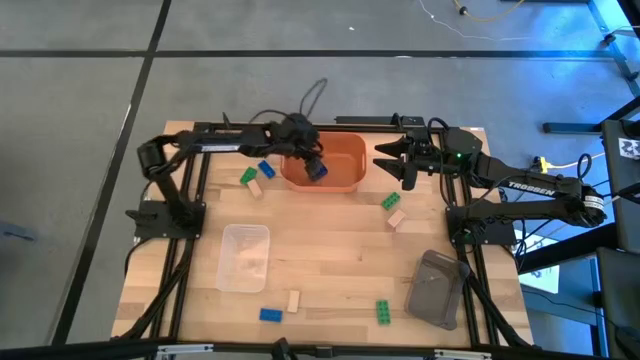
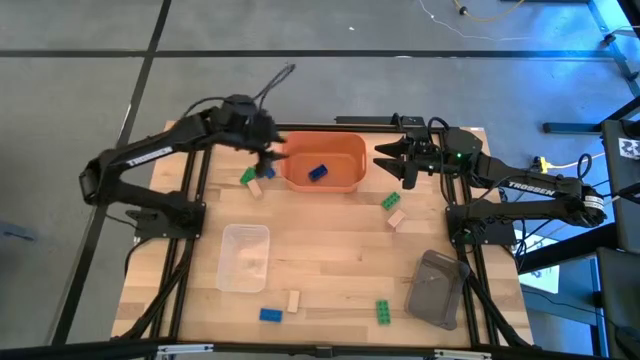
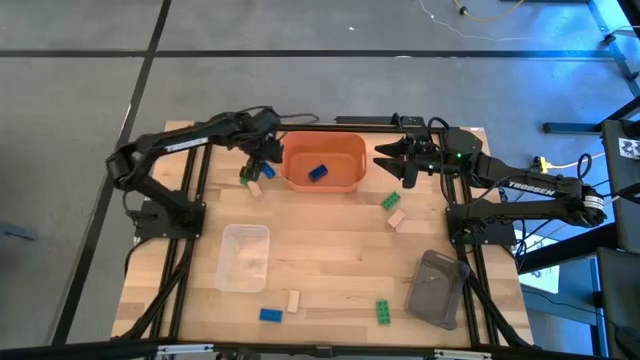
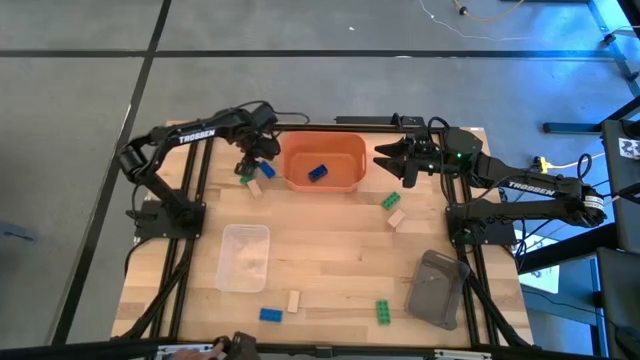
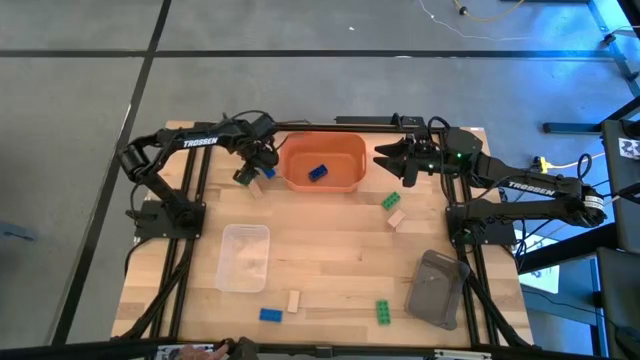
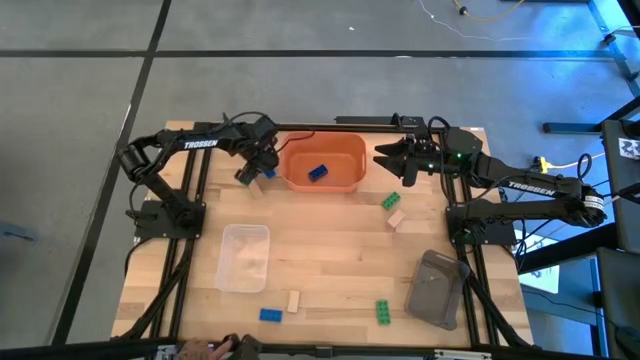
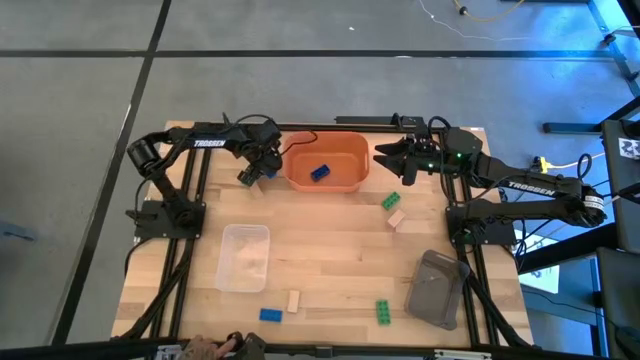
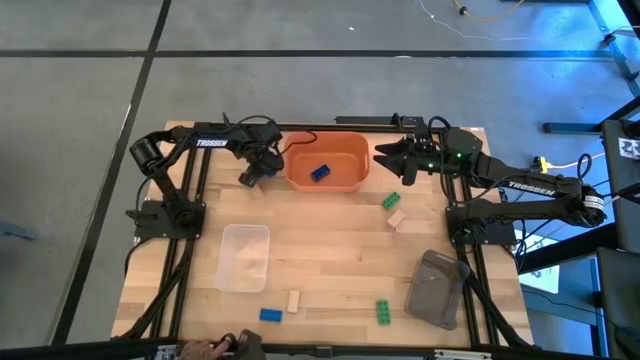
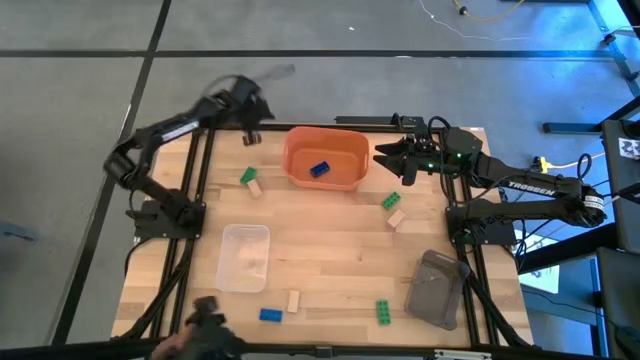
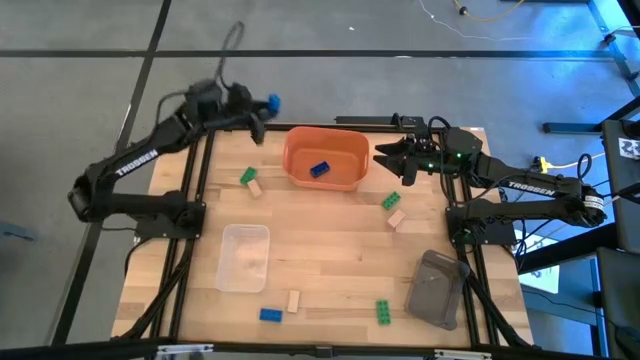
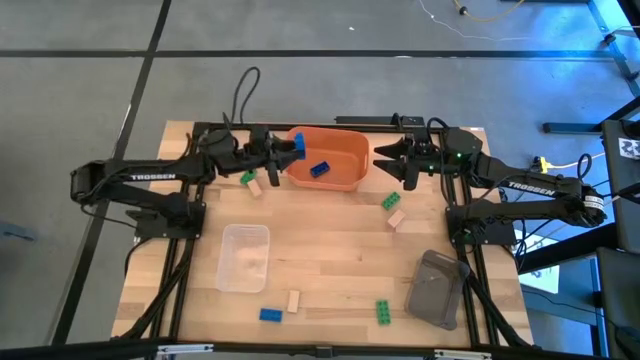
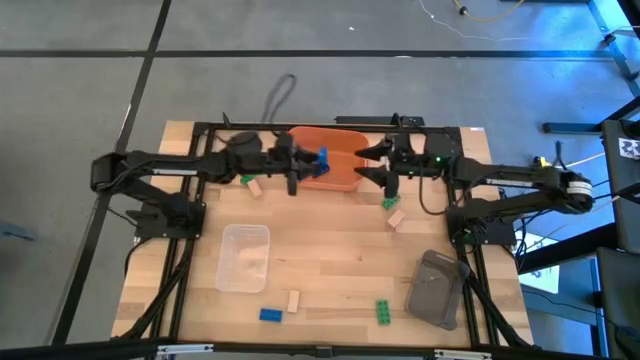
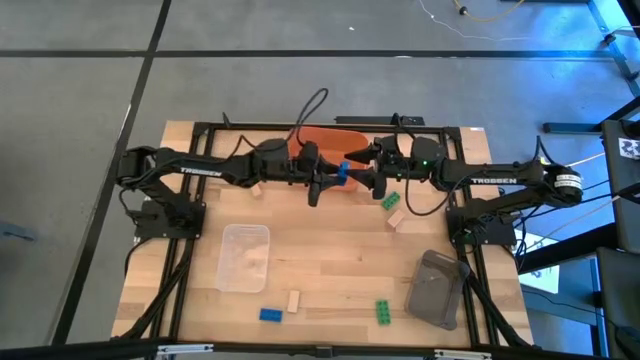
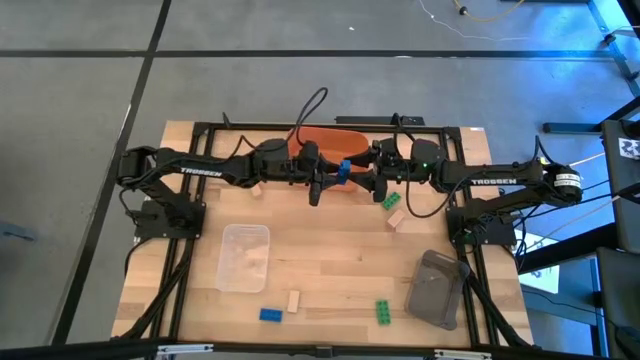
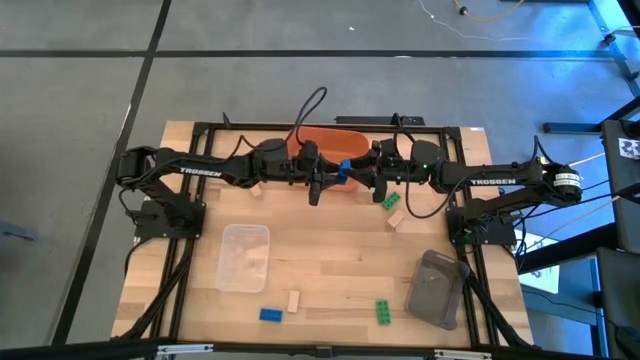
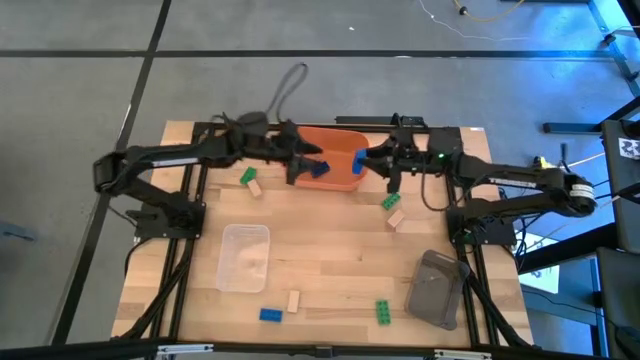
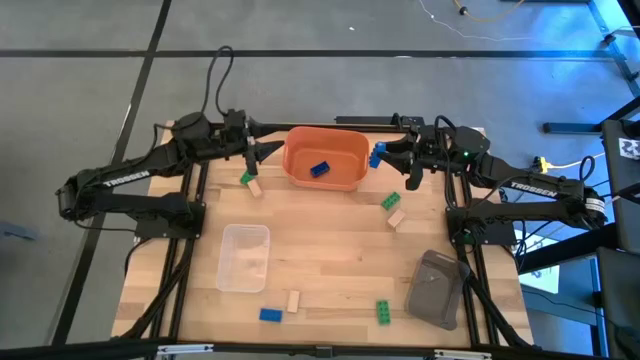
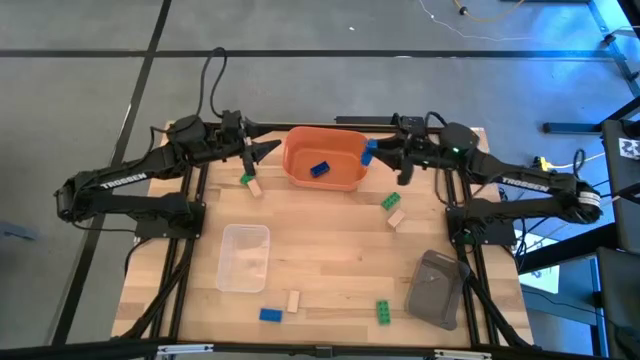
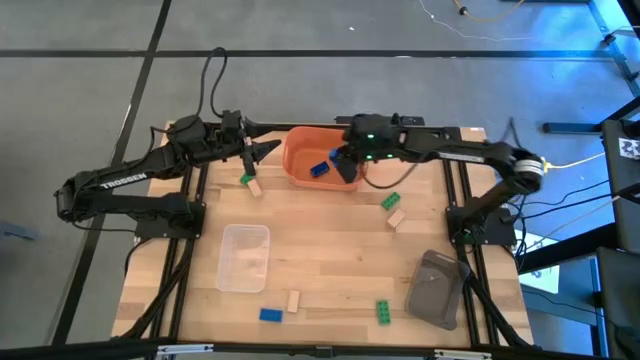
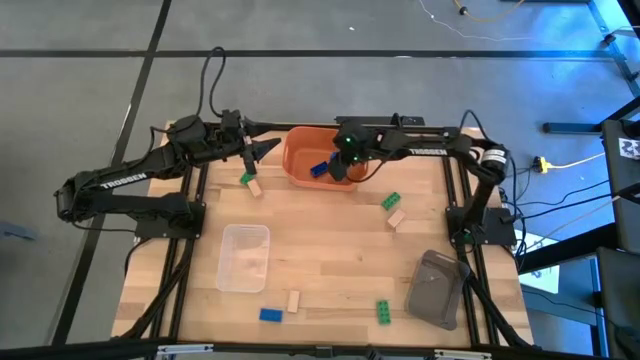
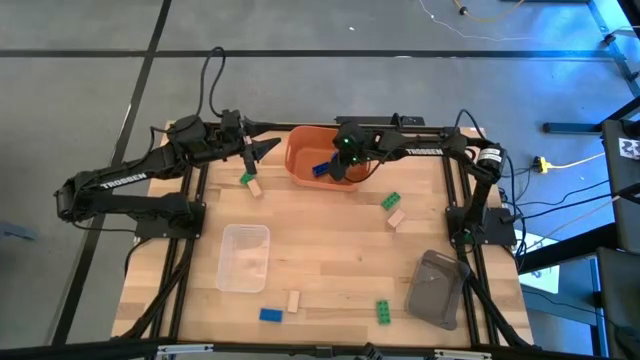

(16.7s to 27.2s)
Task: Sort & place blocks by color
Put the top blue game piece into the orange bin

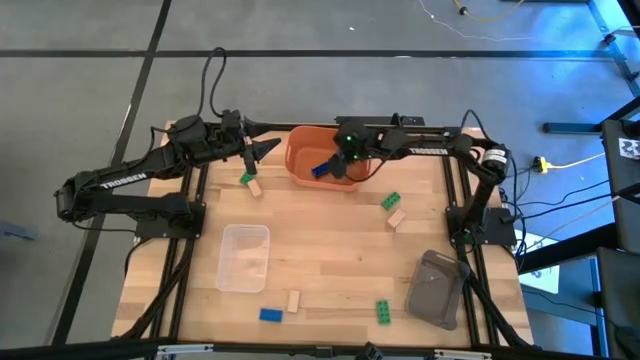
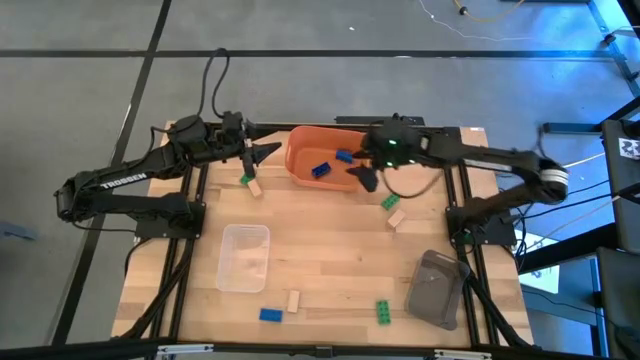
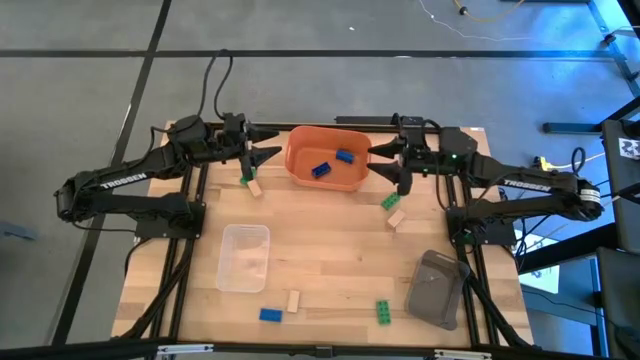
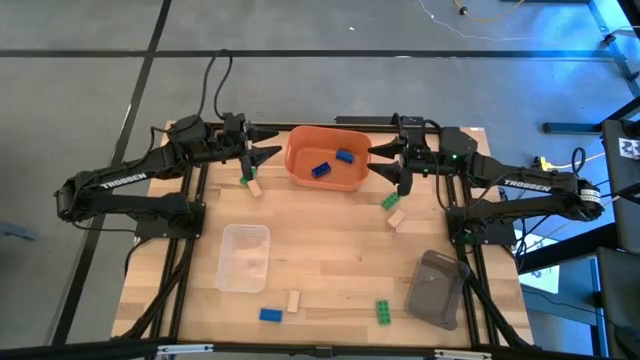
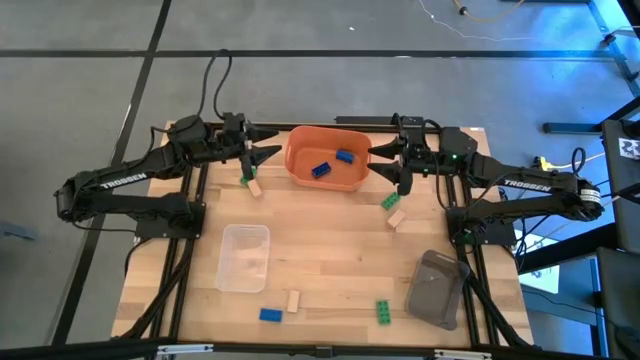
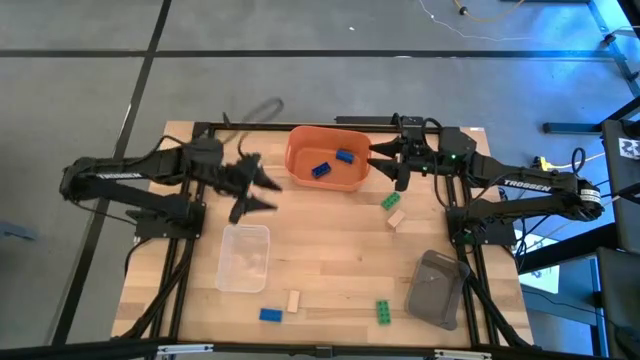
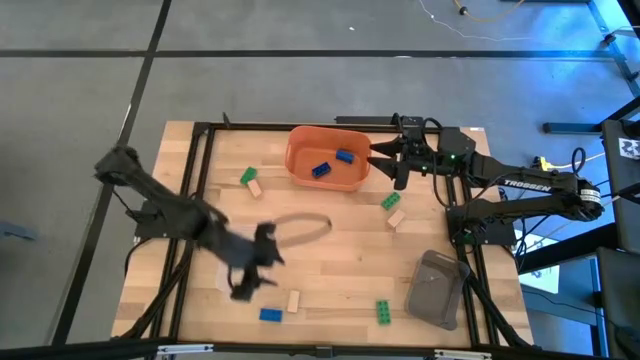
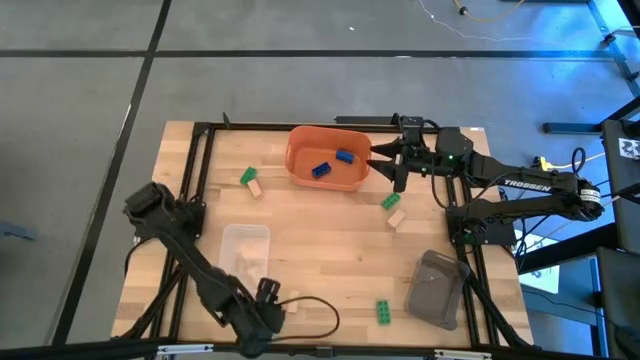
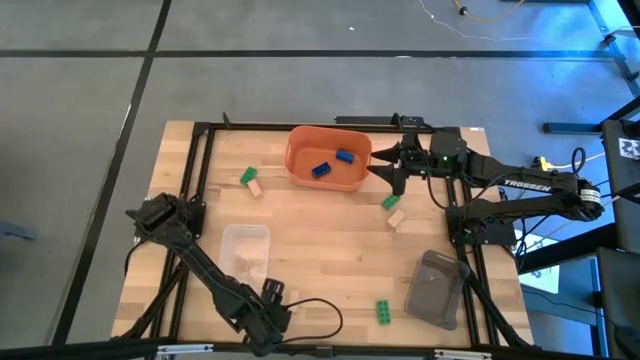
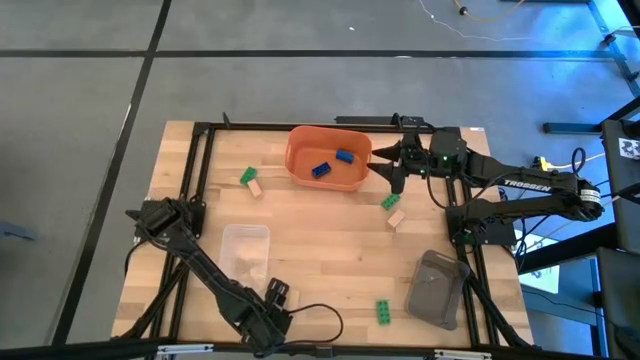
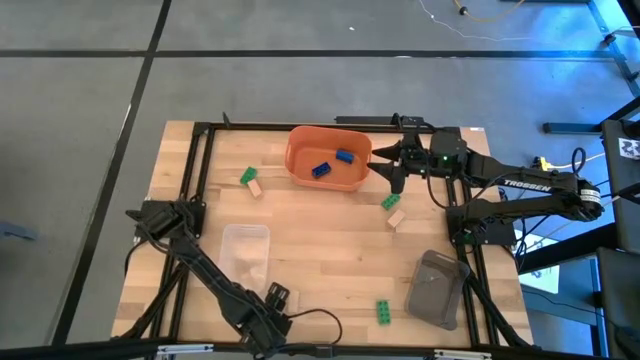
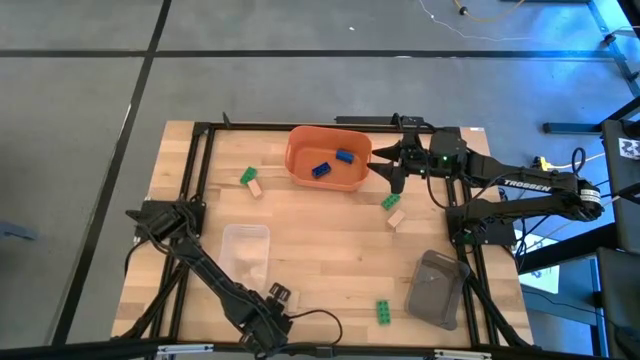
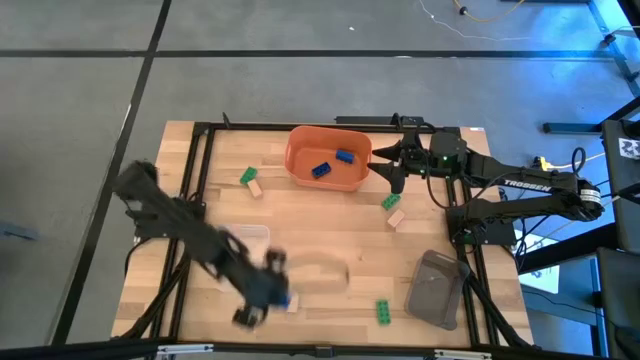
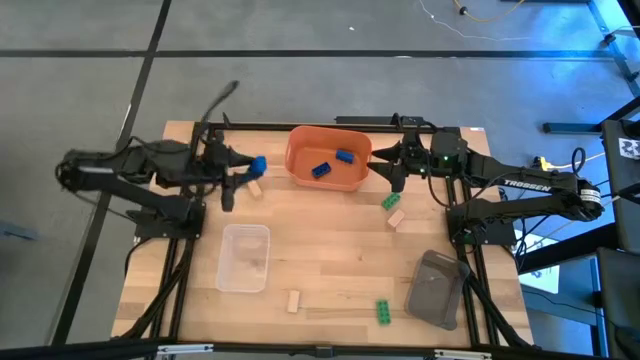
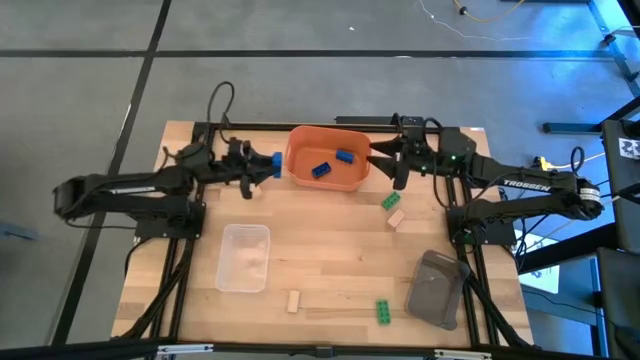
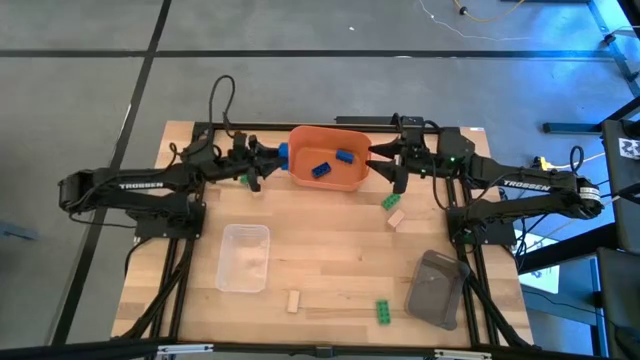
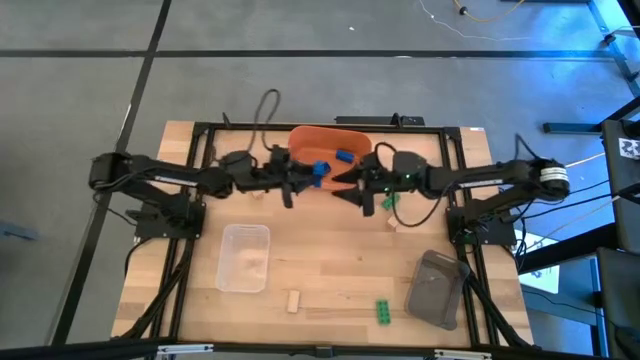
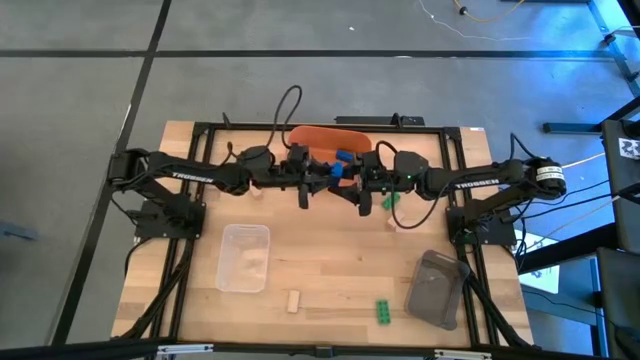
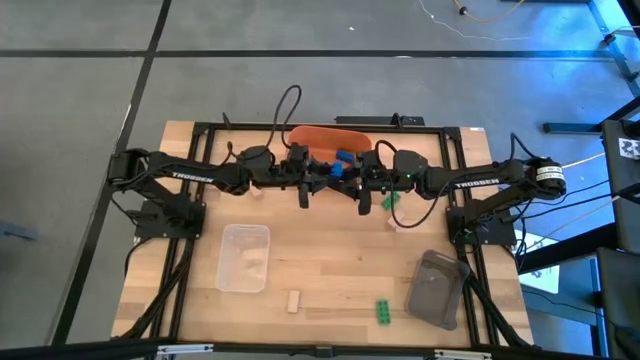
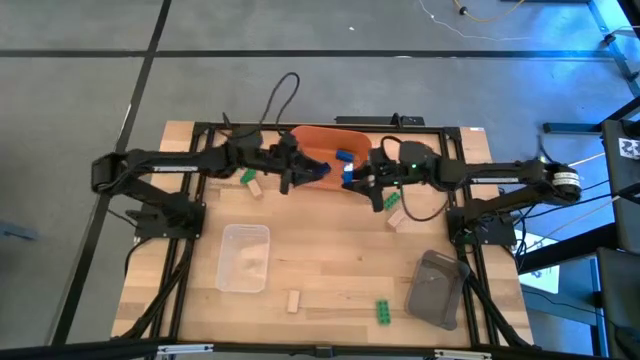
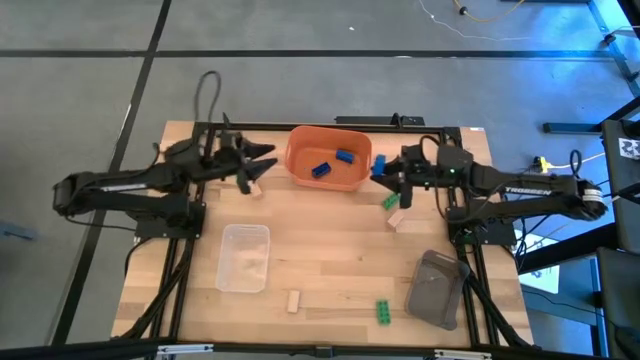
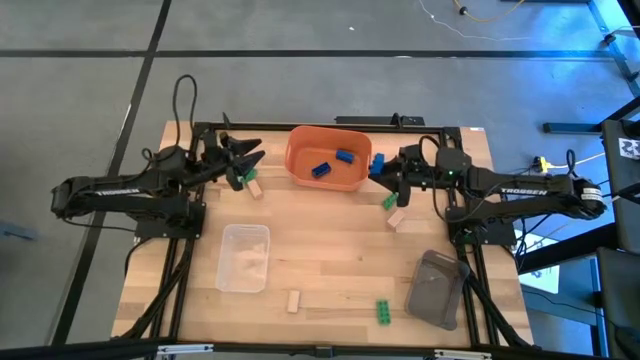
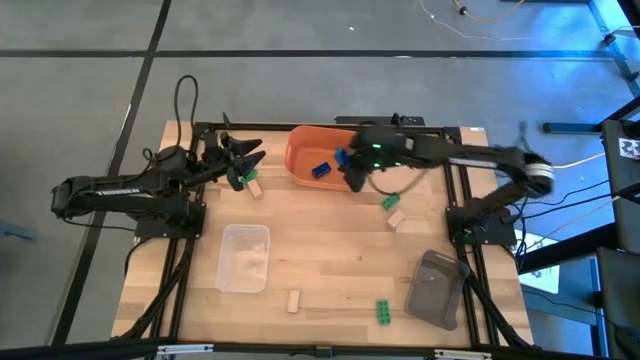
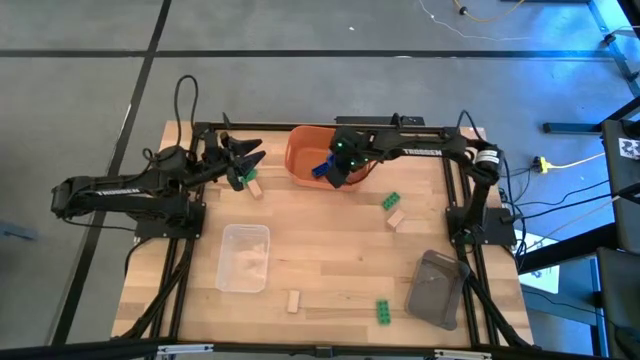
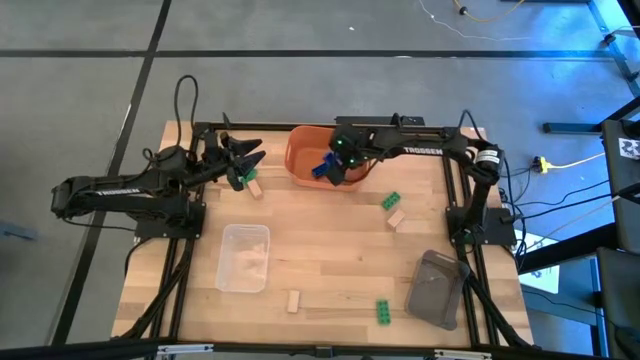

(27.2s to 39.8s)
Put the blue game piece into the orange bin
